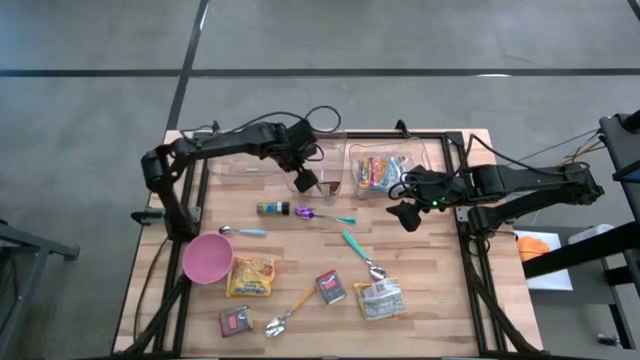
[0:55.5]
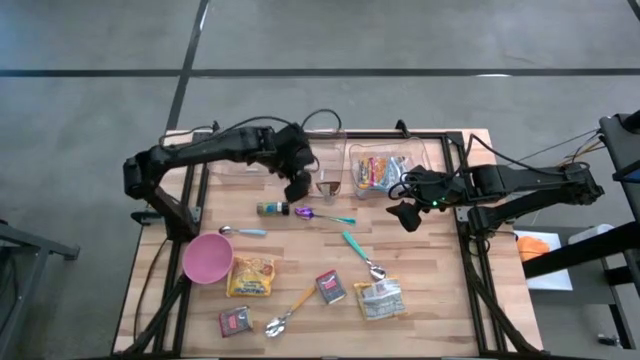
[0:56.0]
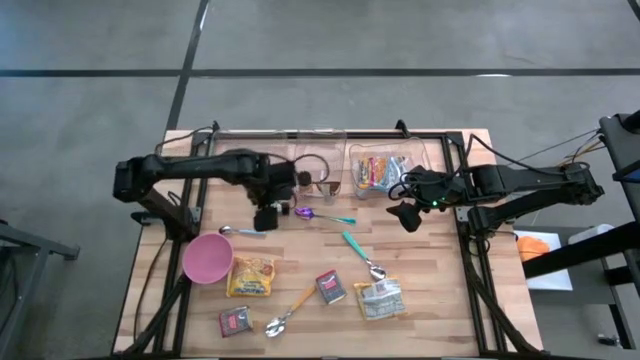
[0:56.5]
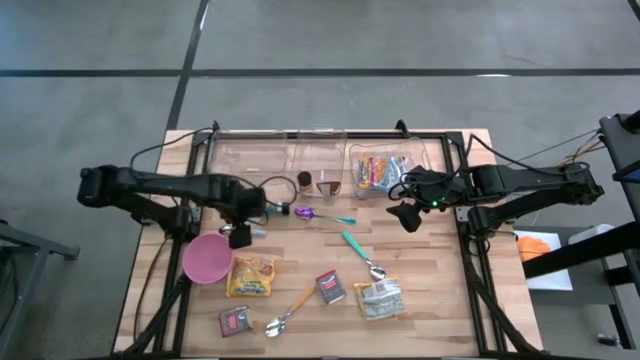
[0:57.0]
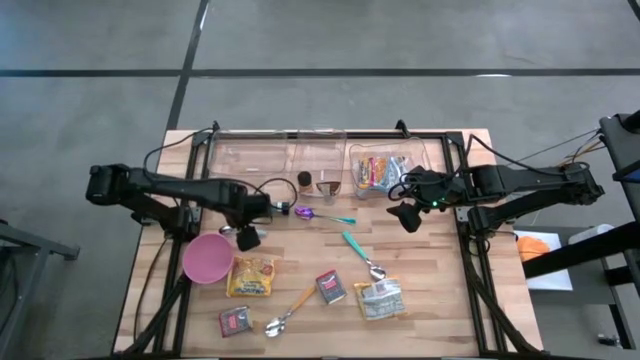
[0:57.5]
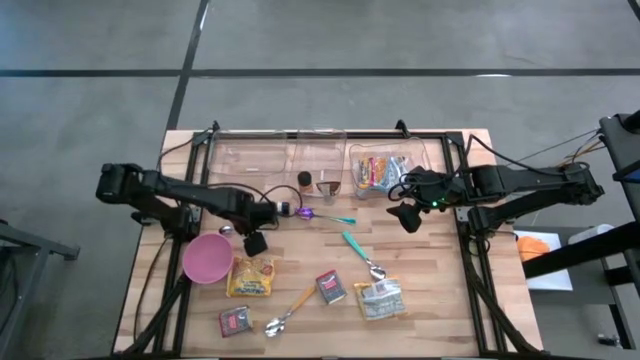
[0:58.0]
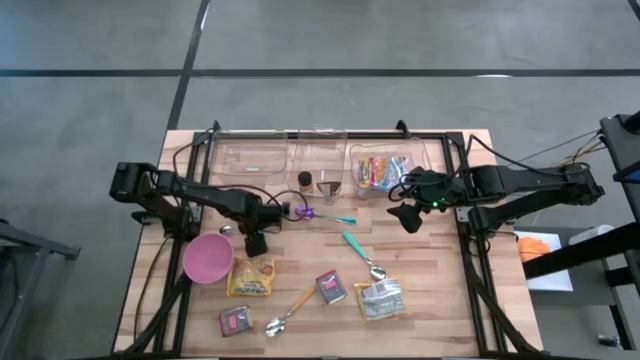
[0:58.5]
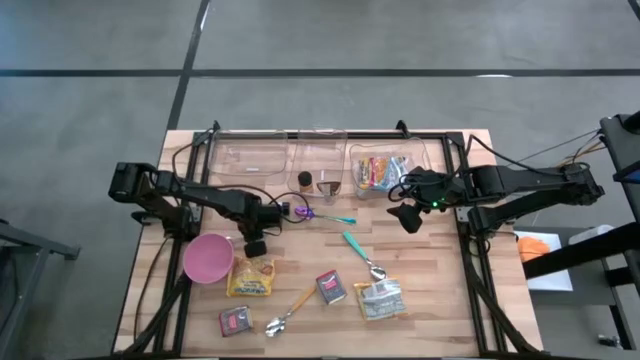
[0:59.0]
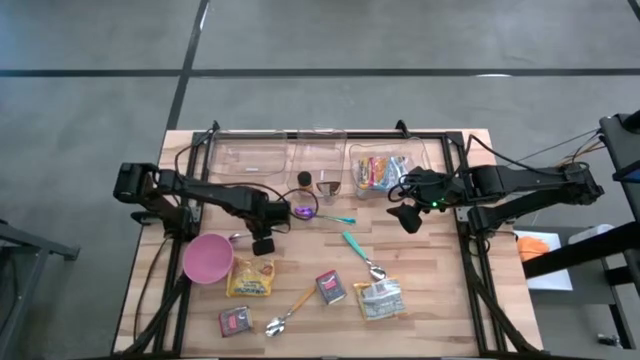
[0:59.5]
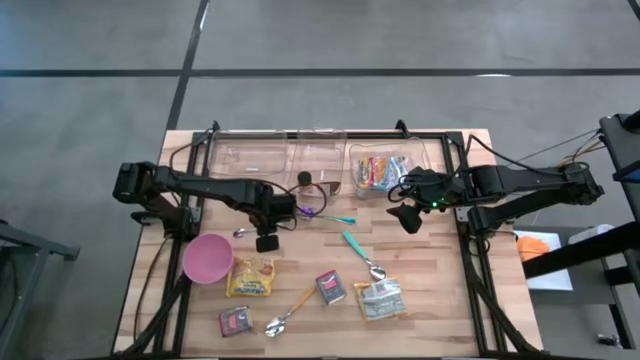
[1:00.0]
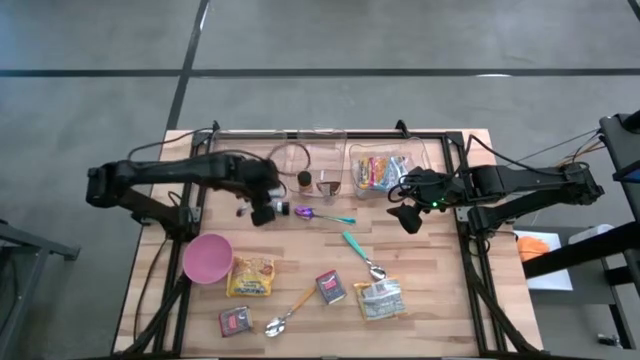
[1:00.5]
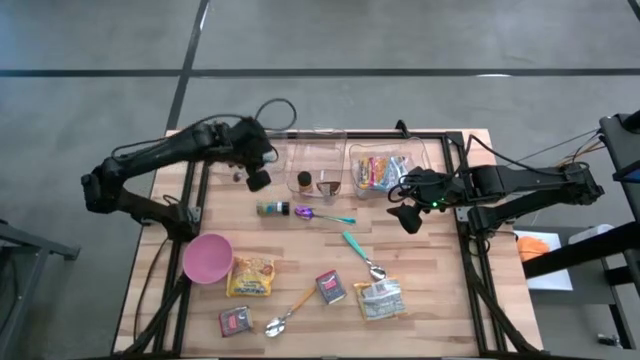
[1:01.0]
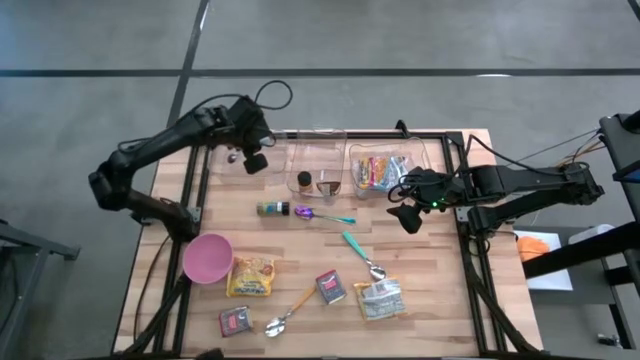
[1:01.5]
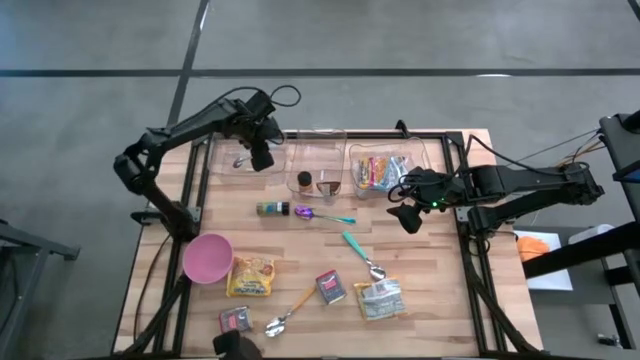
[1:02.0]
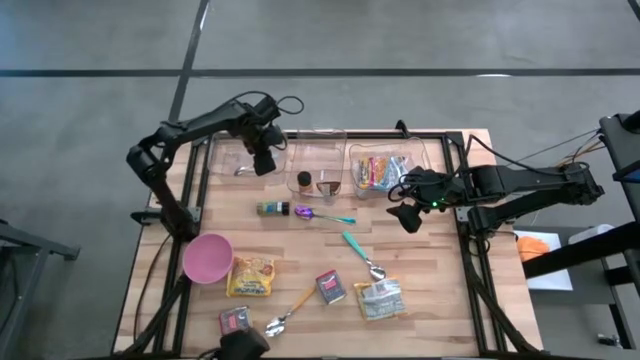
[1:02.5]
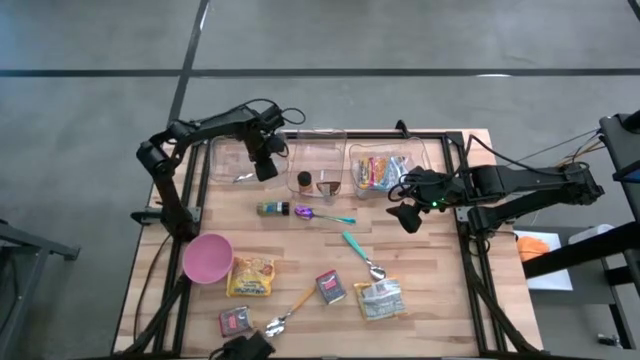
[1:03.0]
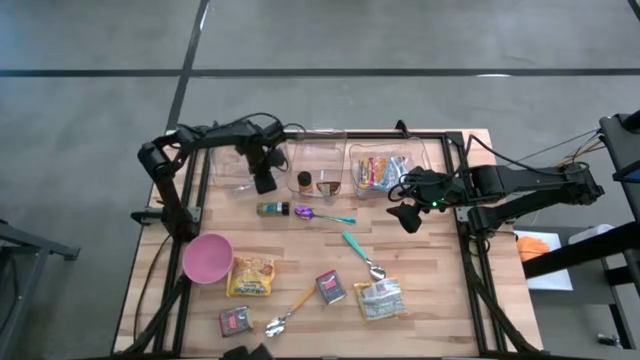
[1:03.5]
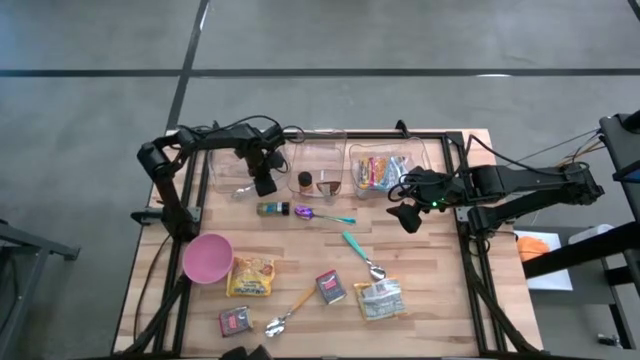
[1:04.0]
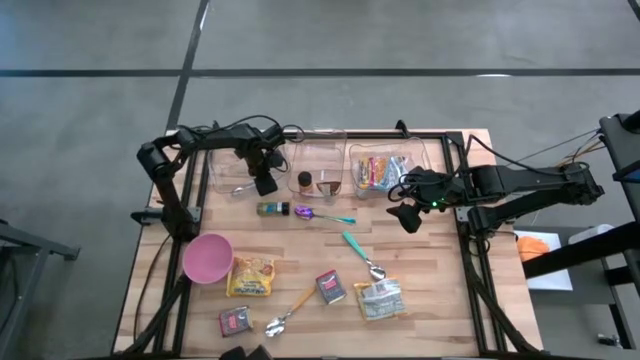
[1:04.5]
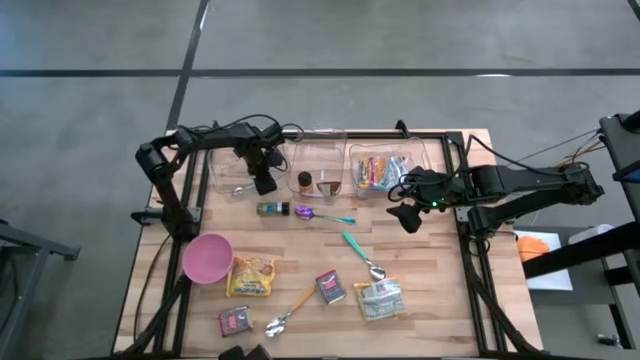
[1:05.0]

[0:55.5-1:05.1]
Put the left light blue spoon into the left transparent bin

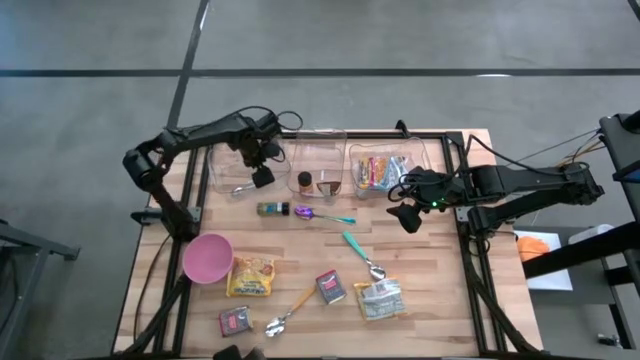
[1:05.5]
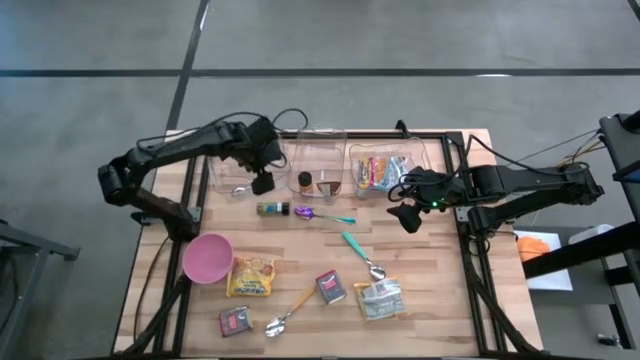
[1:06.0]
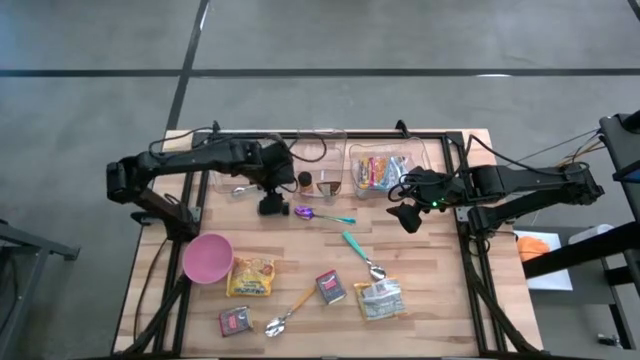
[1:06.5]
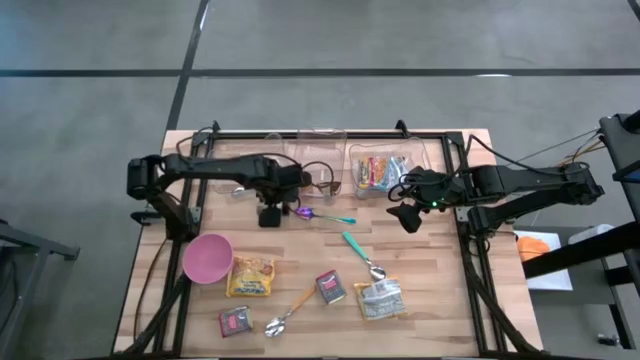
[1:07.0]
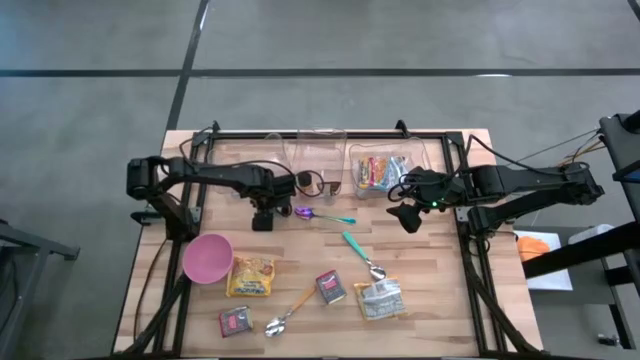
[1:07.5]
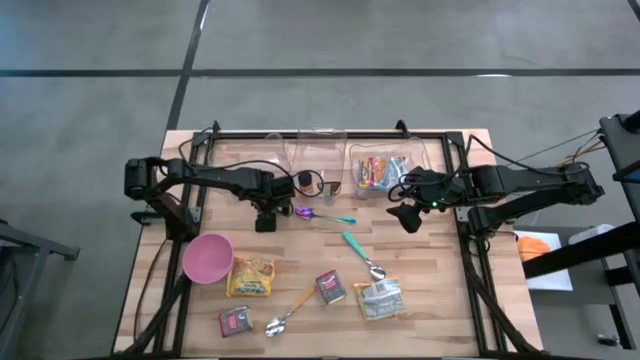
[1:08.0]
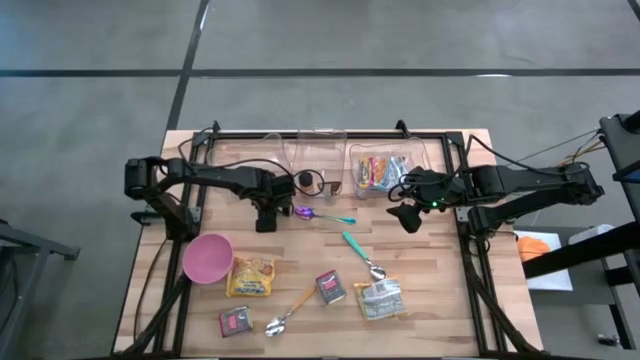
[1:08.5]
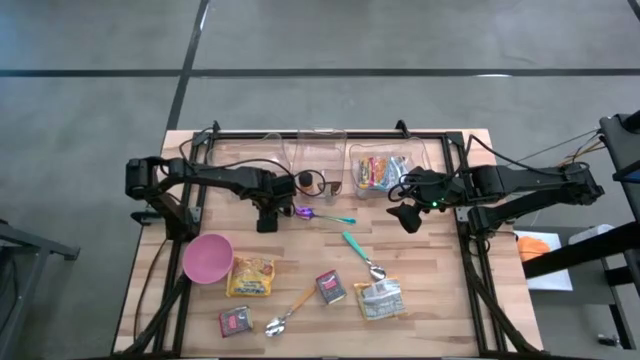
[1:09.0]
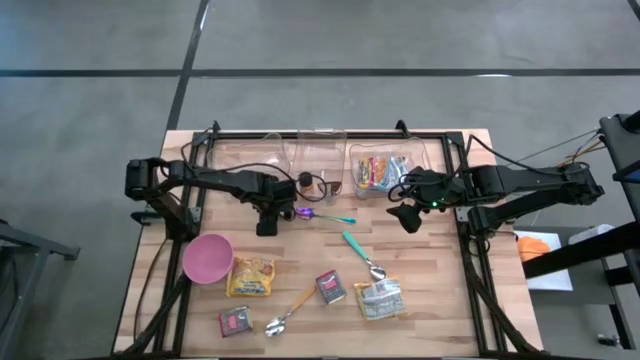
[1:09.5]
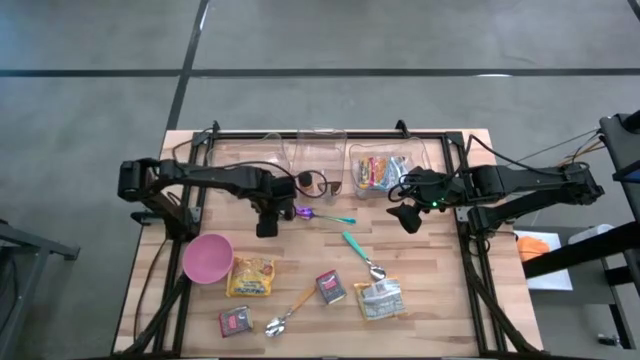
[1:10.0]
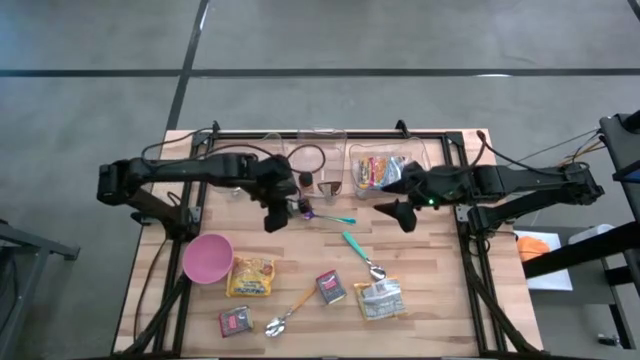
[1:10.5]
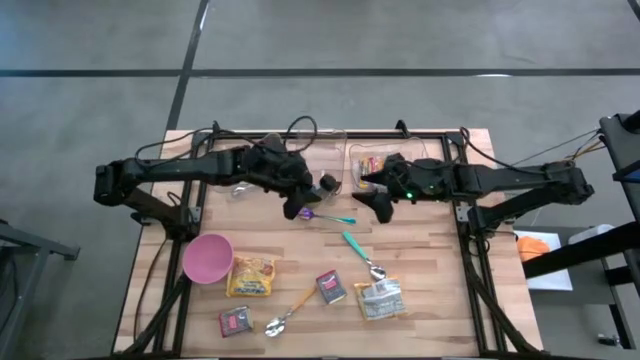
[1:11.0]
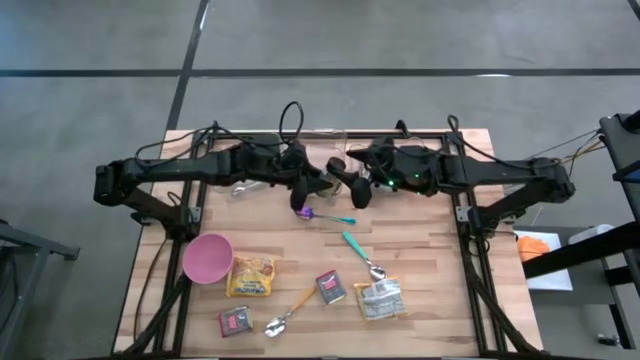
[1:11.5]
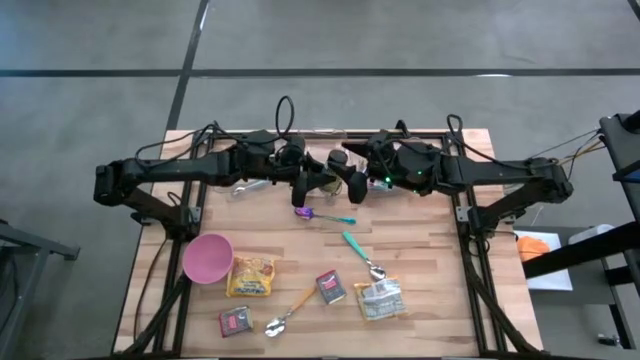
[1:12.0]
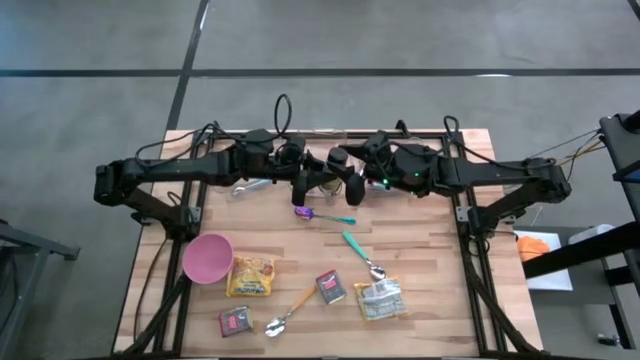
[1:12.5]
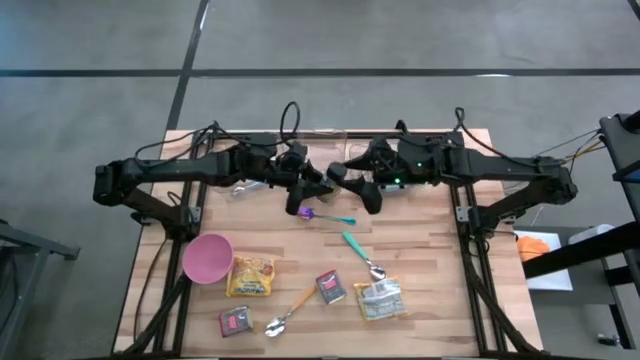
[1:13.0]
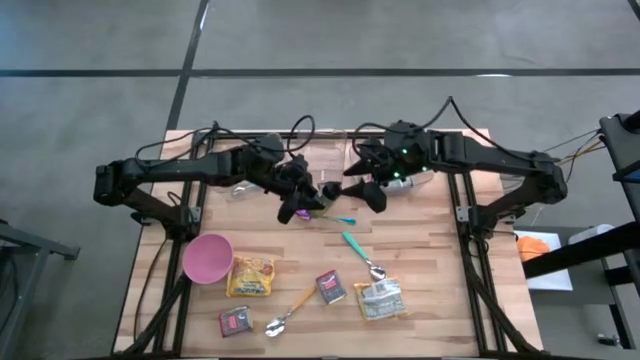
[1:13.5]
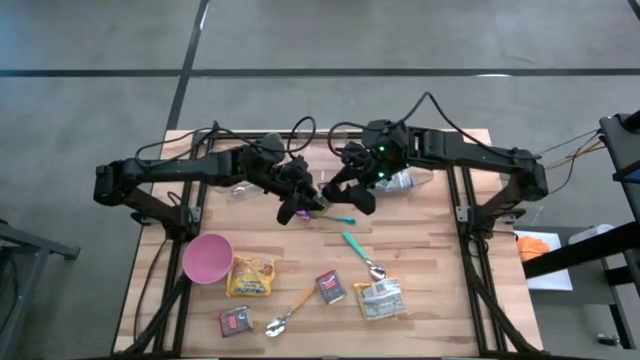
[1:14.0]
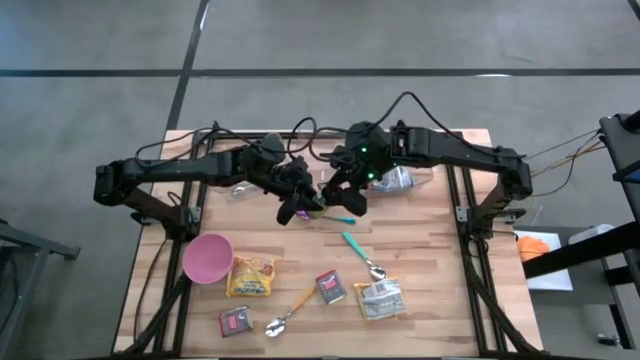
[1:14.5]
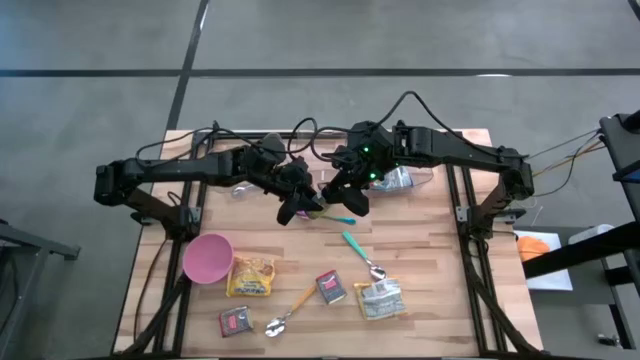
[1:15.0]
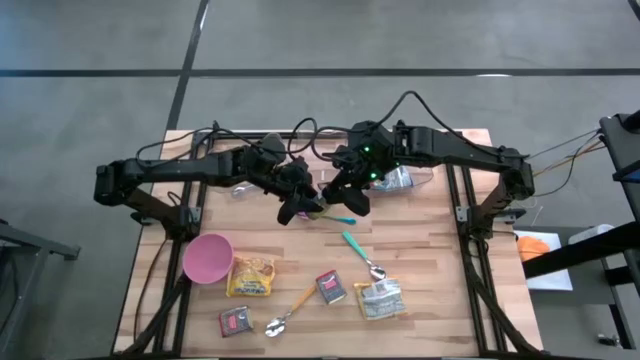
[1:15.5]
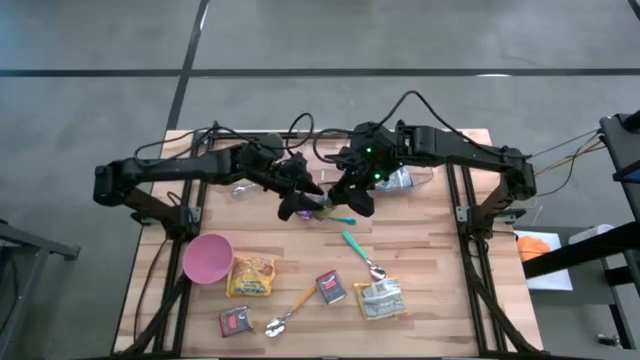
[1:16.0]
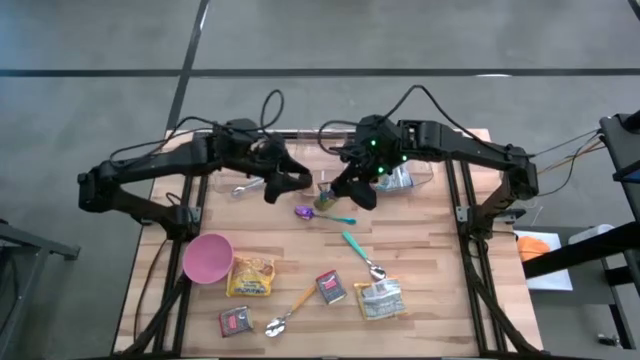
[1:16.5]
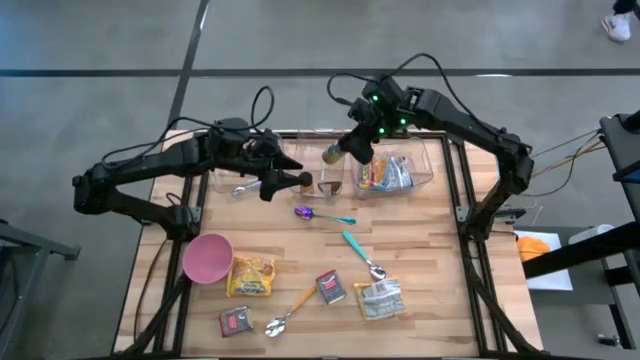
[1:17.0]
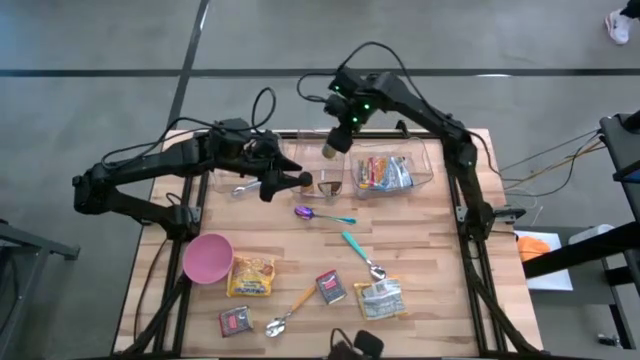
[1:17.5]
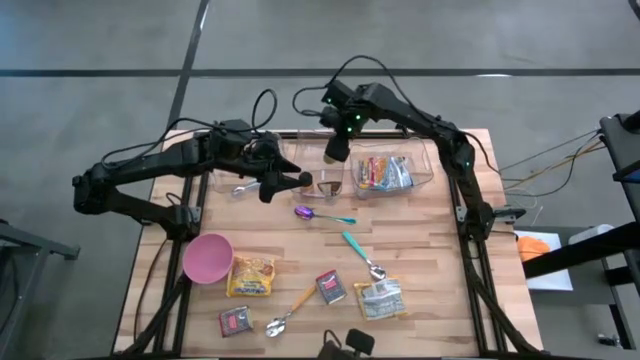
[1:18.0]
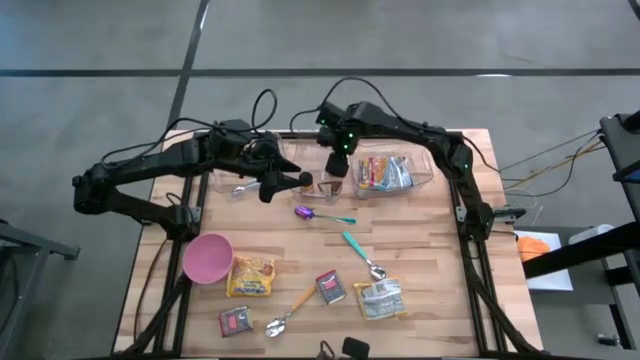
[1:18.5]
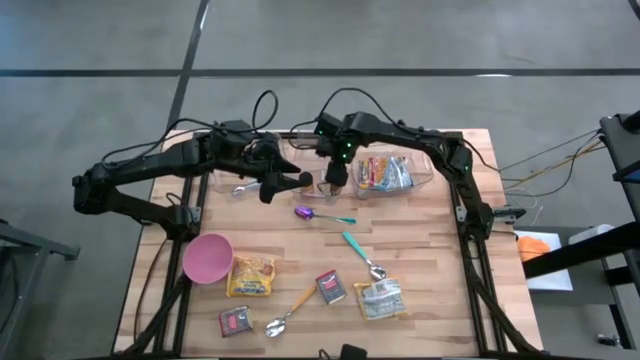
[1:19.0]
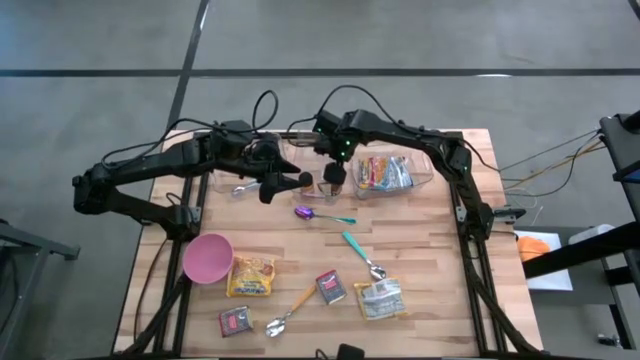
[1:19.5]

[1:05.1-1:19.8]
Put the black seasoning bottle into the middle transparent bin
